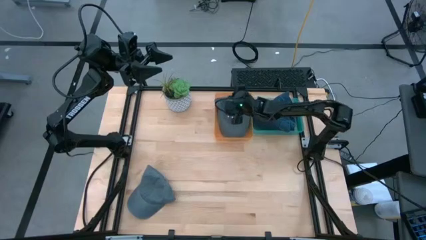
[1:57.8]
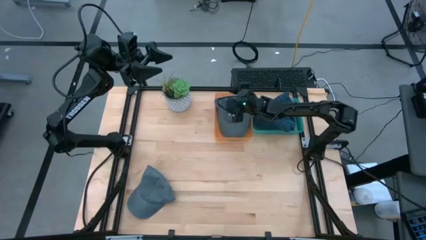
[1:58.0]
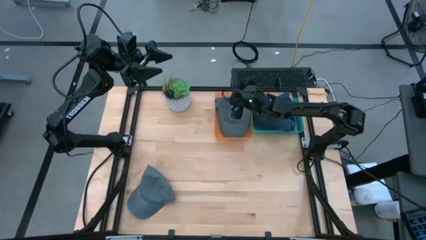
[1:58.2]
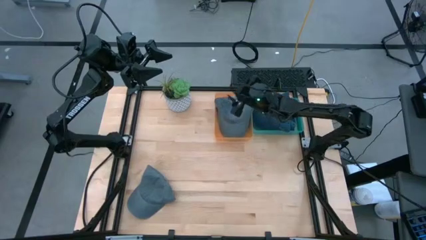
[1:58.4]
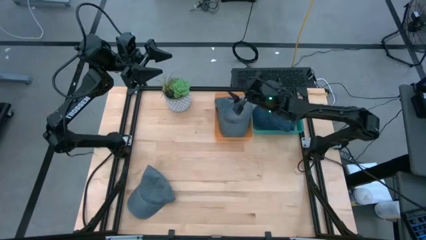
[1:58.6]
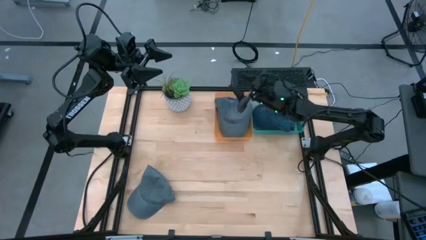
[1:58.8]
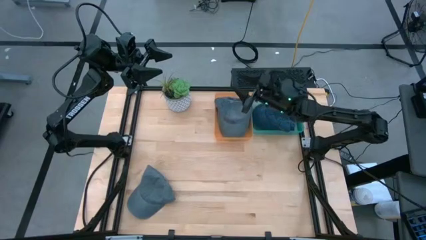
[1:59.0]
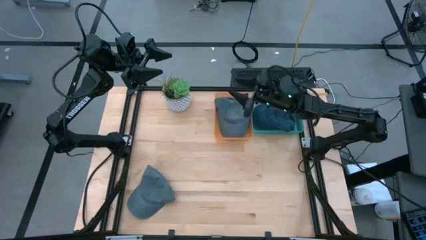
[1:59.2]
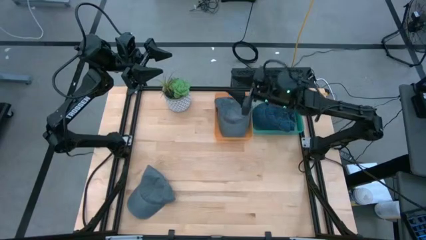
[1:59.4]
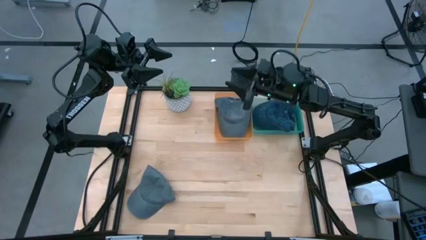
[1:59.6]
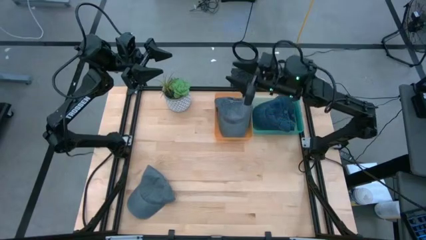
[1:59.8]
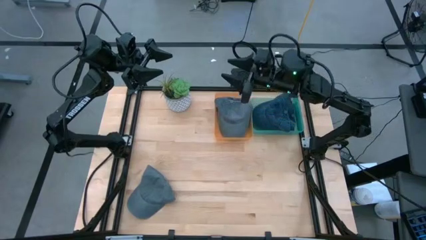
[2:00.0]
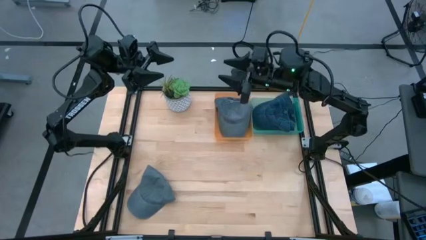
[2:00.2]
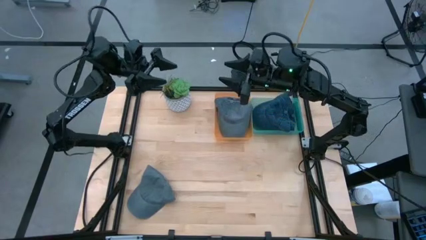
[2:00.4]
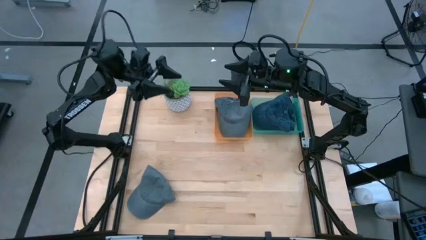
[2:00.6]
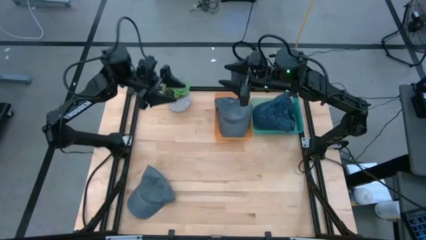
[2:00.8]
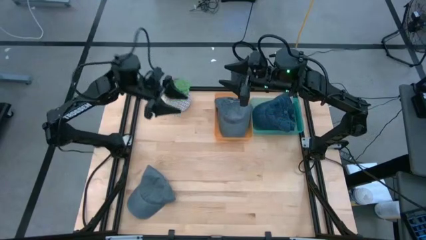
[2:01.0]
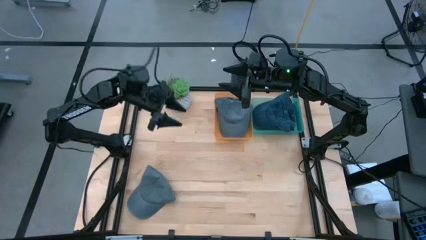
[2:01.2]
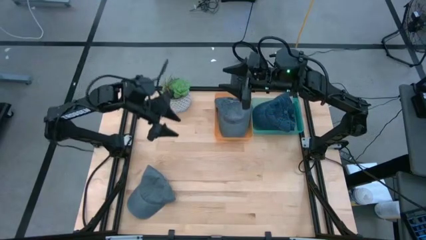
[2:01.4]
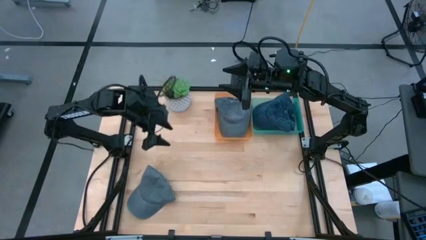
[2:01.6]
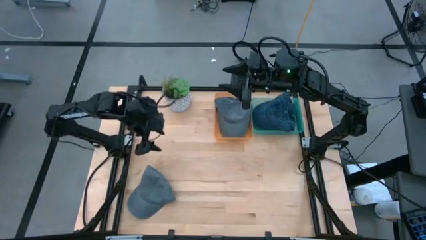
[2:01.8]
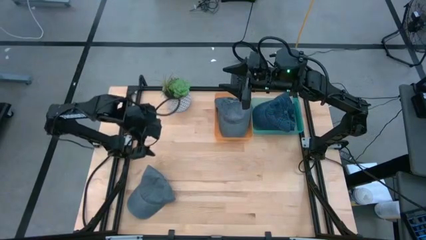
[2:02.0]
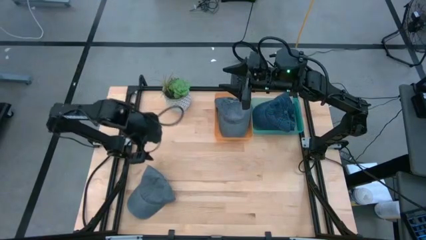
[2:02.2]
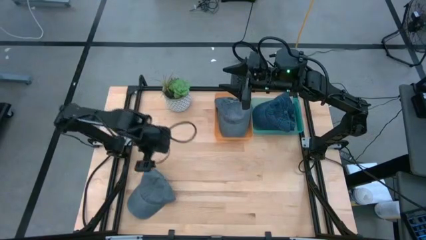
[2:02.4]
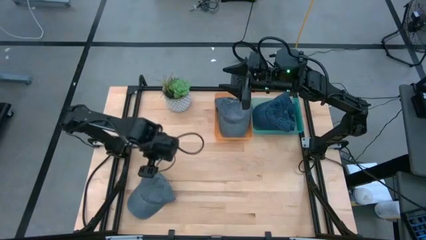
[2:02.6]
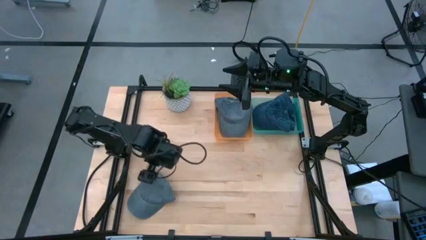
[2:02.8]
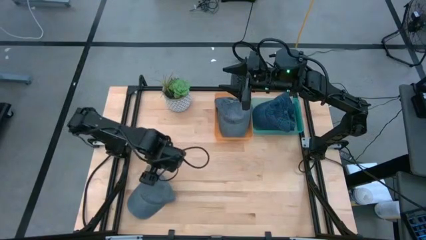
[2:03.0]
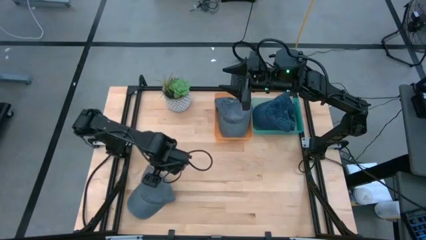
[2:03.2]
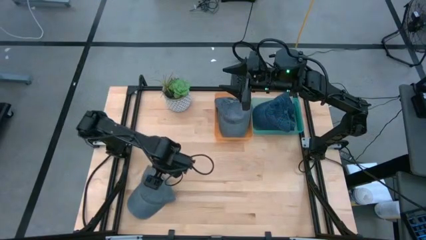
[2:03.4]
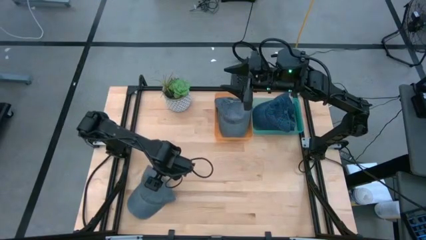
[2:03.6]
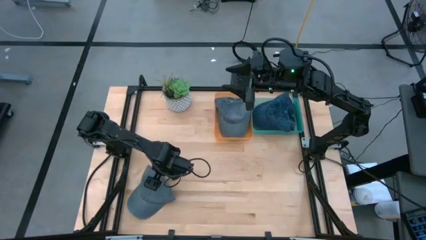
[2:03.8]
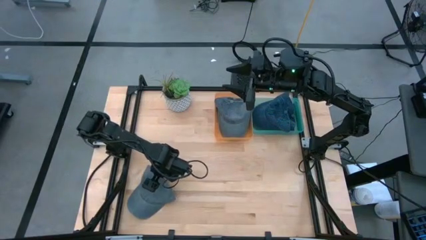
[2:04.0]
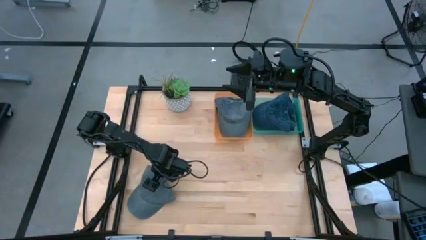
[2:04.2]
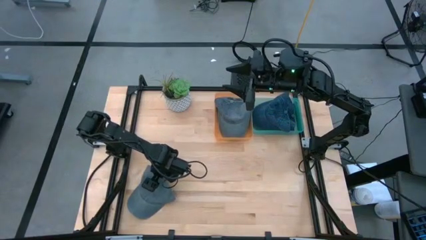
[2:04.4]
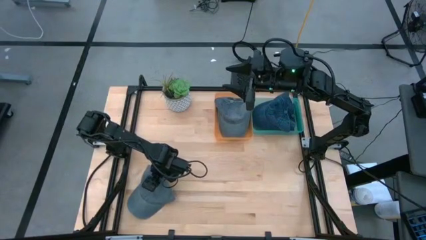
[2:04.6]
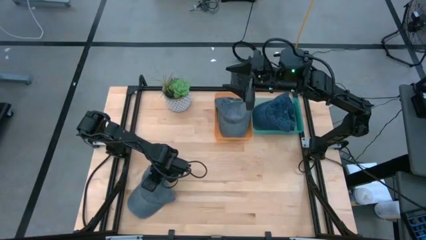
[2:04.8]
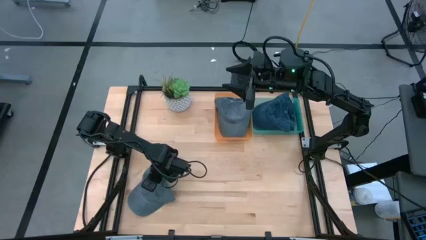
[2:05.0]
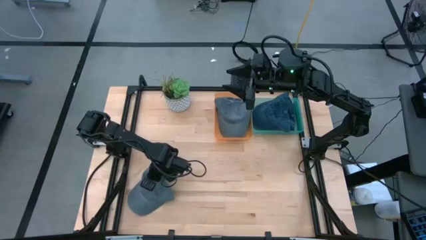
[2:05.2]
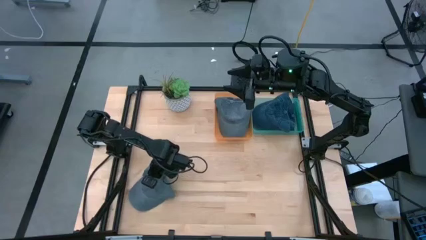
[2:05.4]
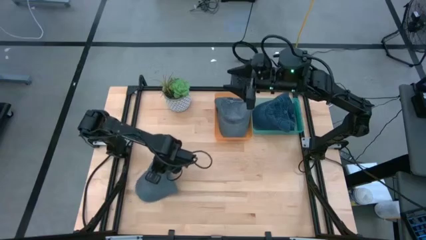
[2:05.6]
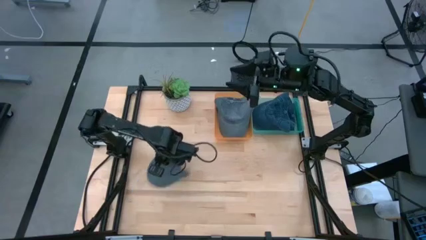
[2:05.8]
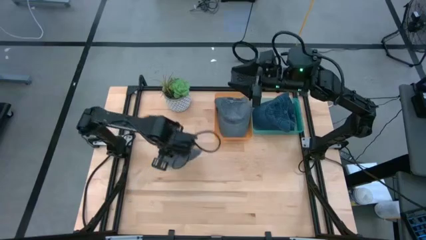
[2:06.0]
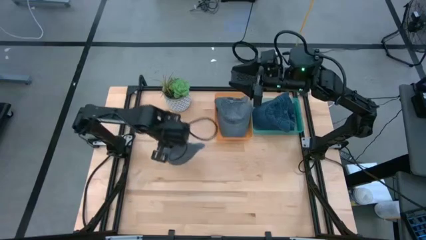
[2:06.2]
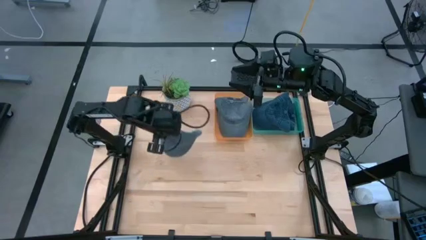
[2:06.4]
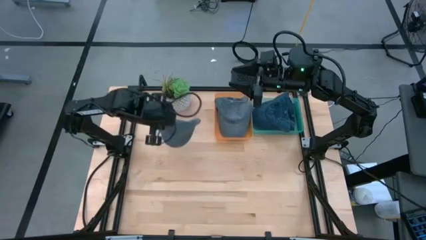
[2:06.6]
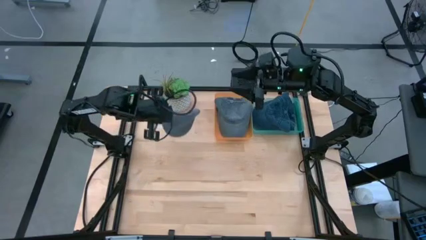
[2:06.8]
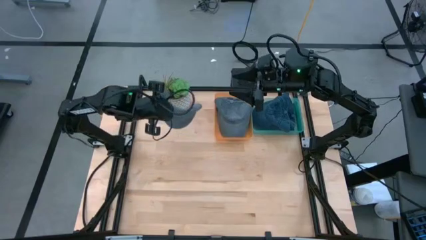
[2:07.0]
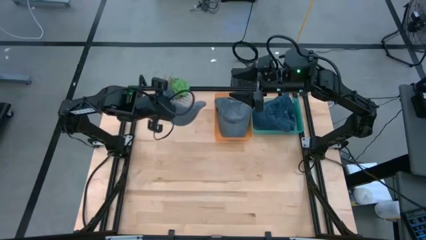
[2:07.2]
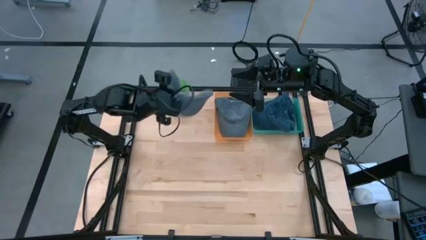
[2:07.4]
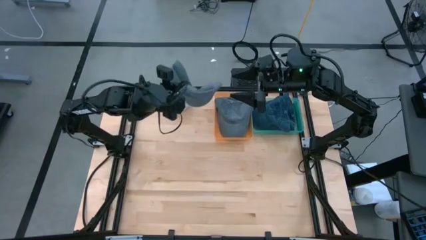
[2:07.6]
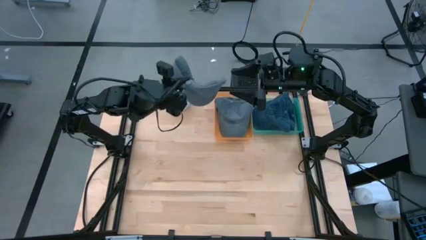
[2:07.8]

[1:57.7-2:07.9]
Task: Pick & Place hat
Put the gray cap in the orange bin

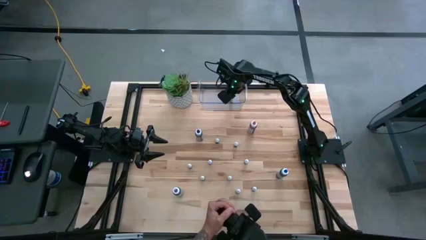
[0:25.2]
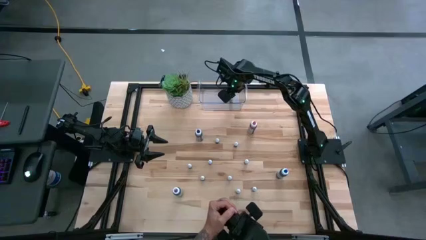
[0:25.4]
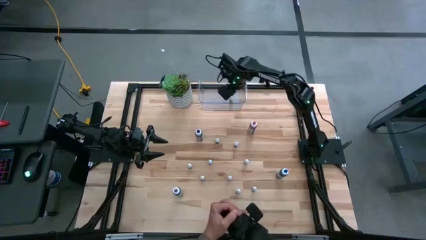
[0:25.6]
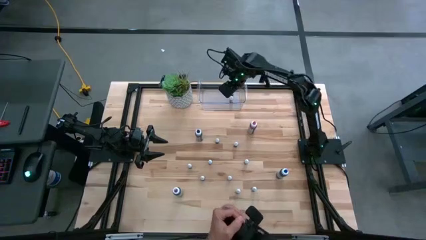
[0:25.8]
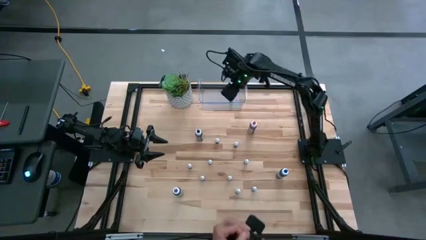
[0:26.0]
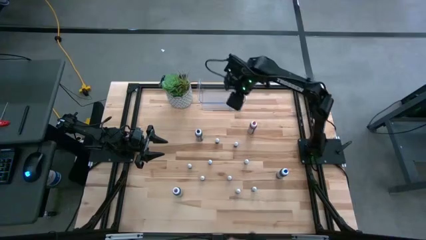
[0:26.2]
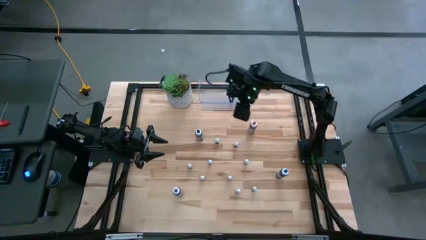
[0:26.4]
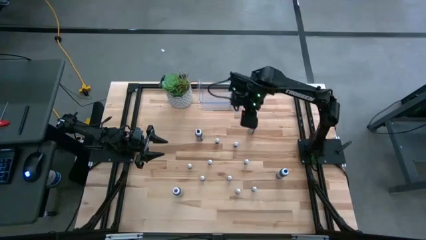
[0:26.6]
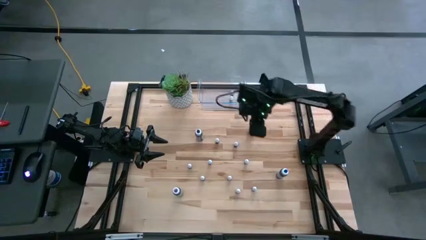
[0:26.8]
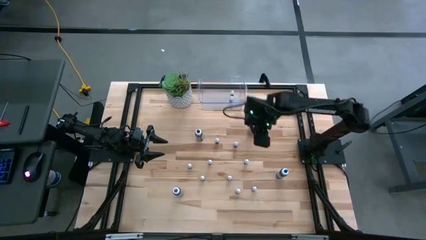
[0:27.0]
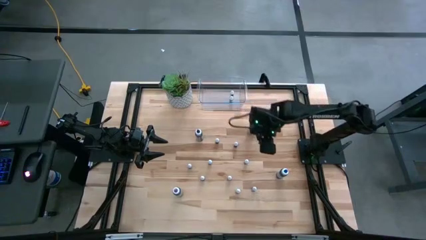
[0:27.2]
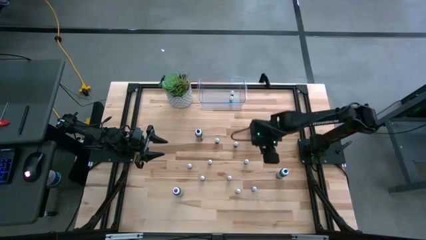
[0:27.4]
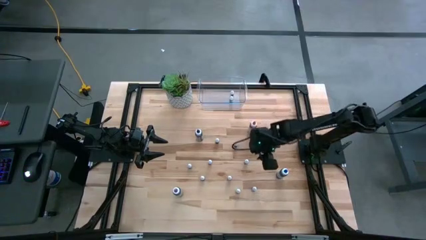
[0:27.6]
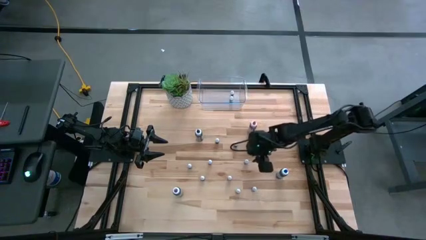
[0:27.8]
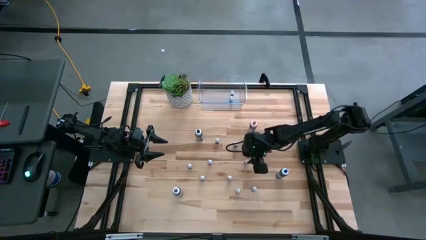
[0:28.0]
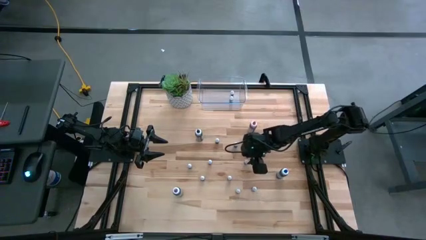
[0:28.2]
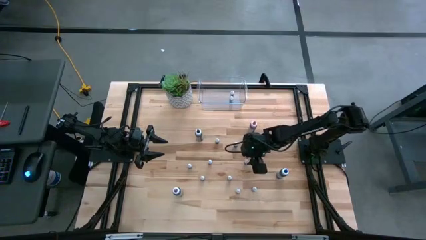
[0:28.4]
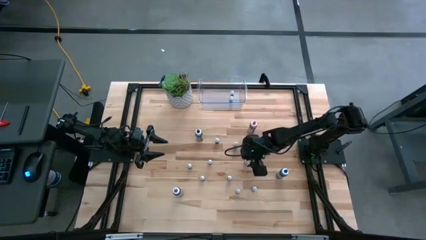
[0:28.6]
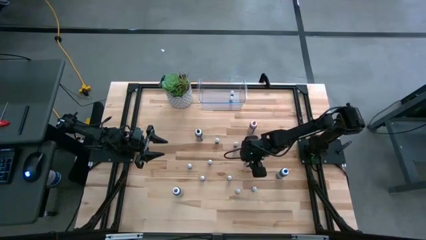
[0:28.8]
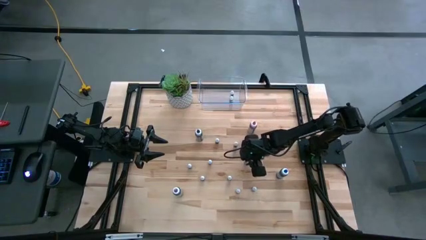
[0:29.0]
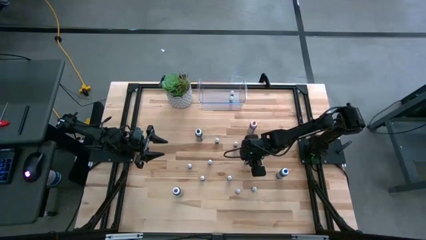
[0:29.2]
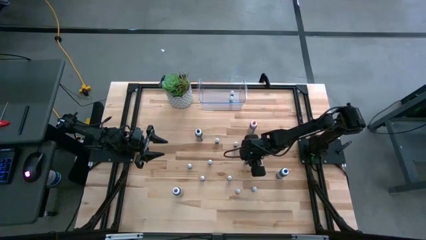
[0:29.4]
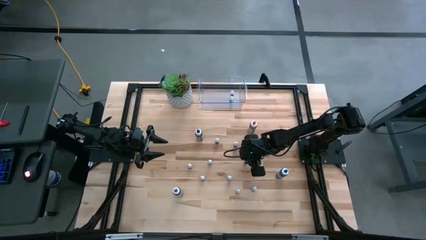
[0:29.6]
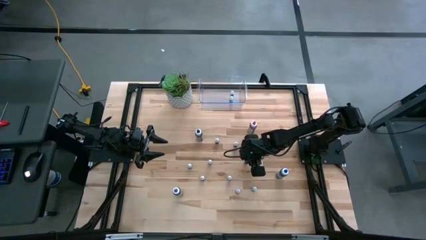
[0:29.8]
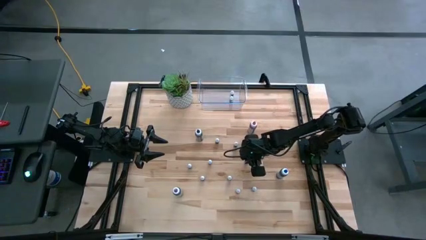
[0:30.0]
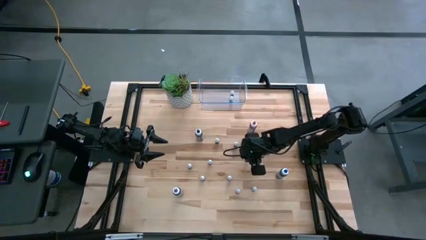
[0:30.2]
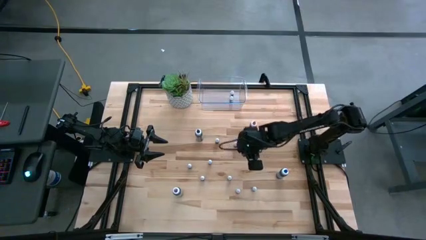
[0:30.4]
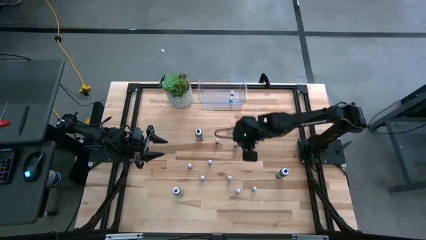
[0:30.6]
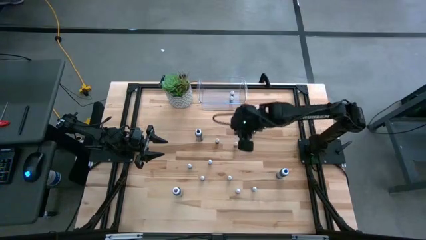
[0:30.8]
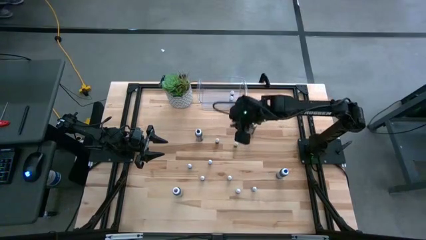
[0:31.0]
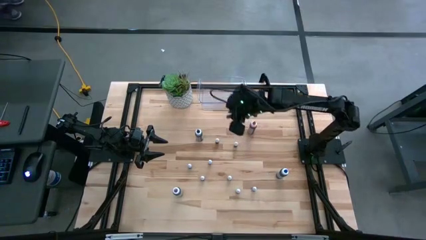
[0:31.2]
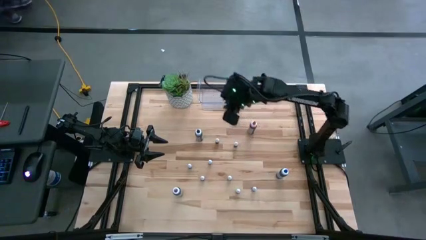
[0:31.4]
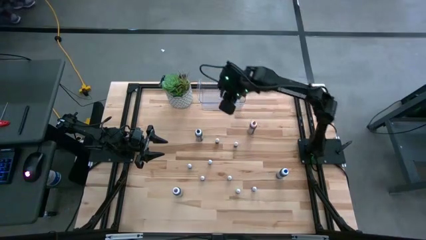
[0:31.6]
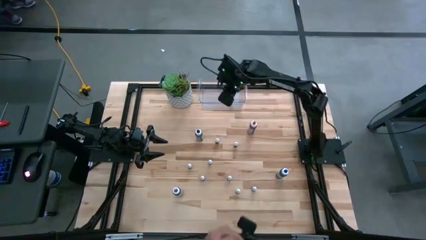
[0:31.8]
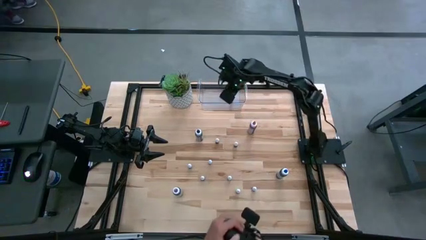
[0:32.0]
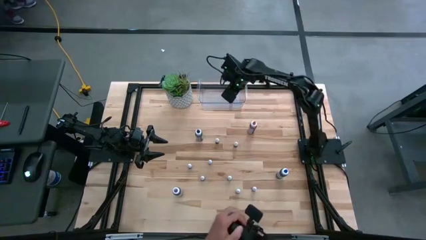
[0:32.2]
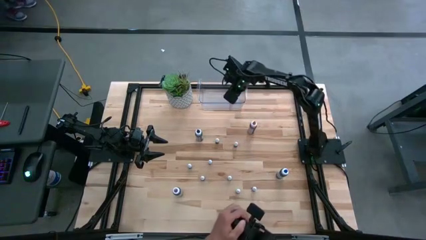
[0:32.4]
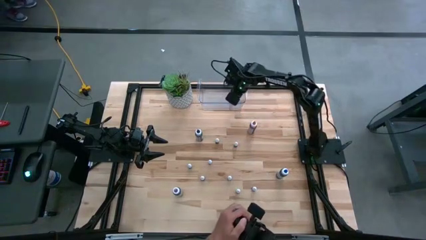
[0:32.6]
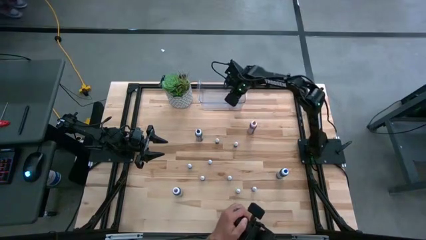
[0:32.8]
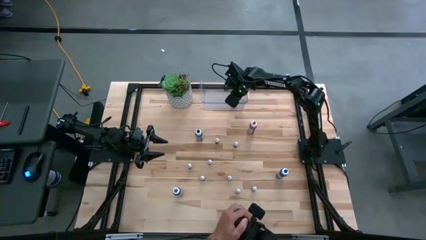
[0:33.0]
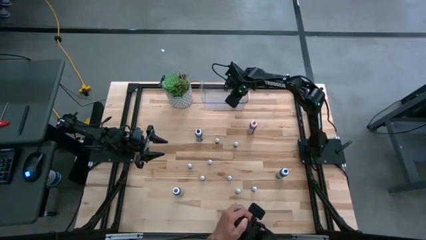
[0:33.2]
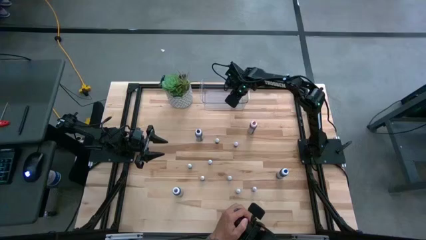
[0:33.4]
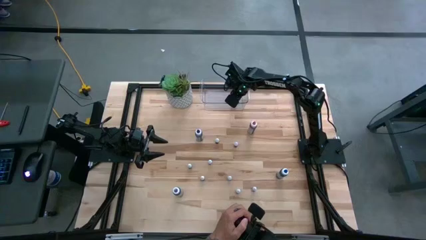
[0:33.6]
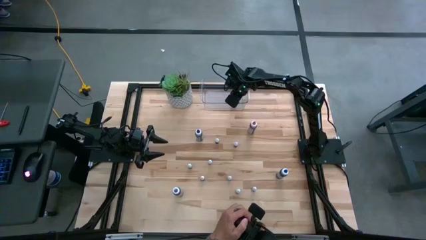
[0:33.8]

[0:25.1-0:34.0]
Task: Pick & Place food coloring
Put the small orange food coloring bottle into the bin
